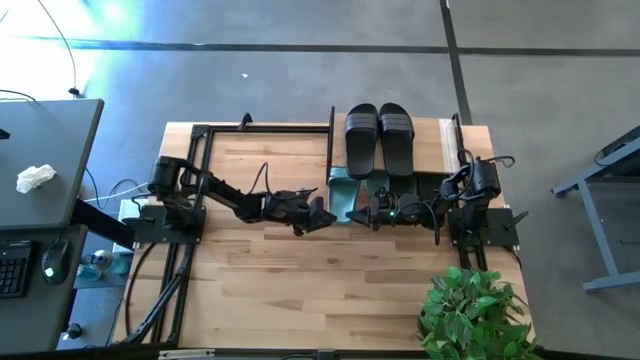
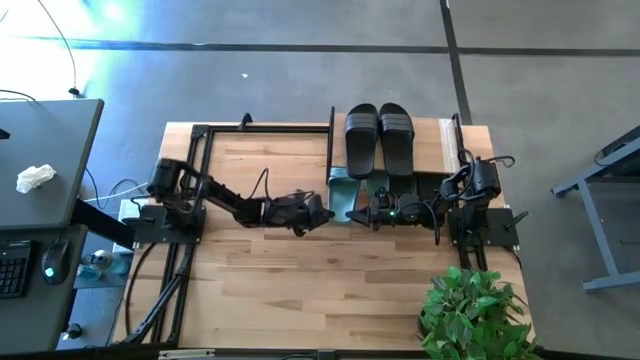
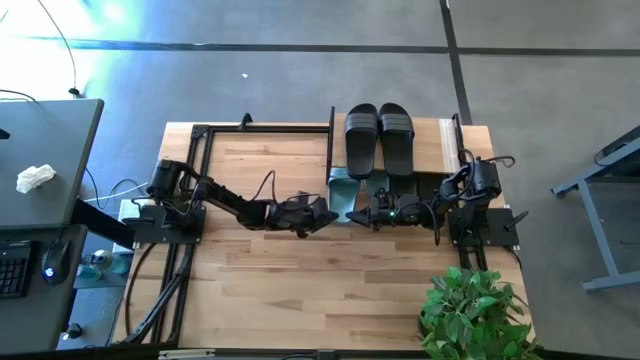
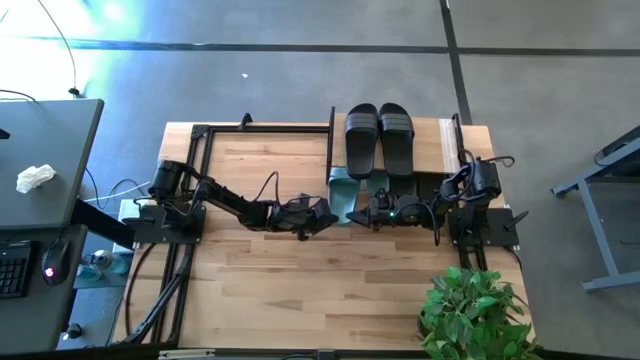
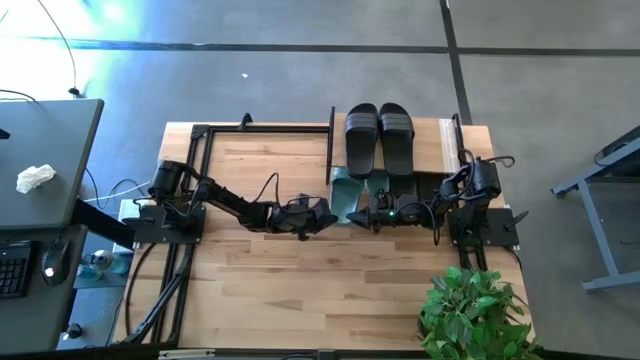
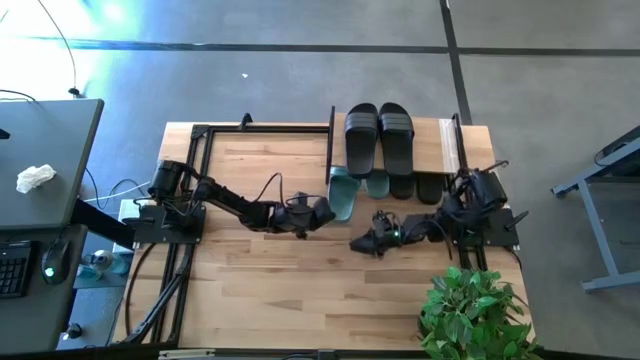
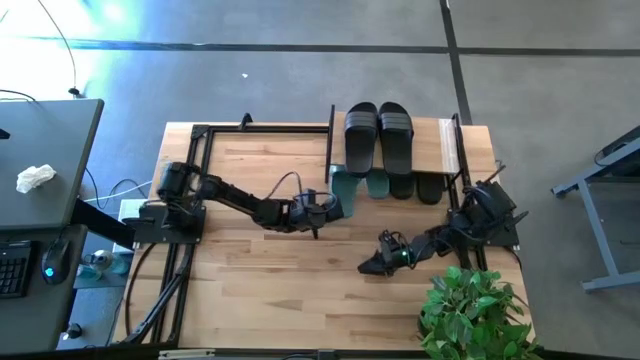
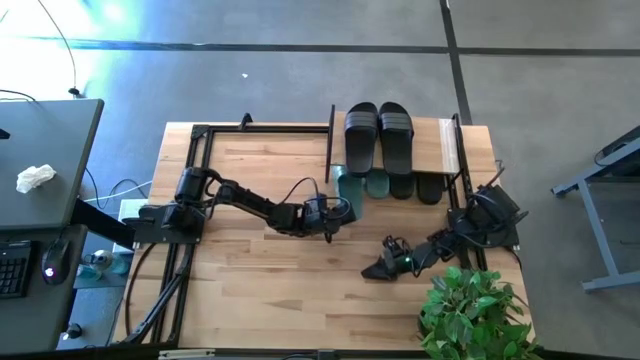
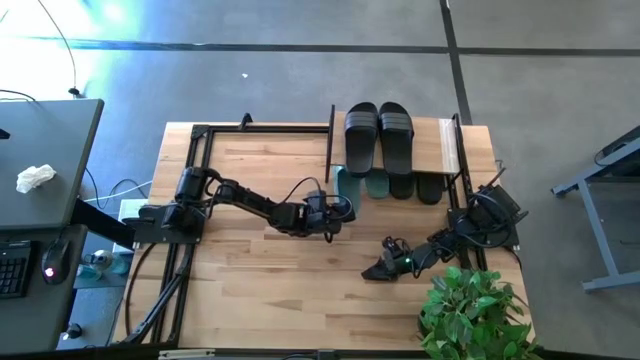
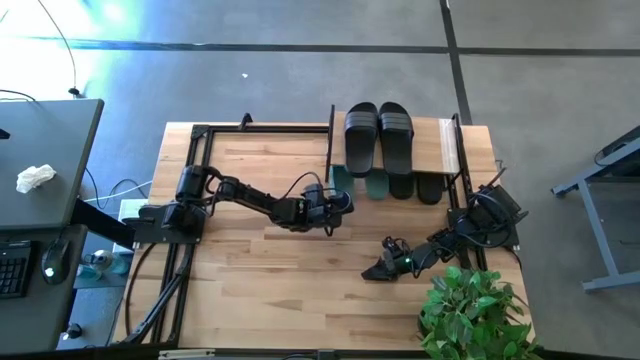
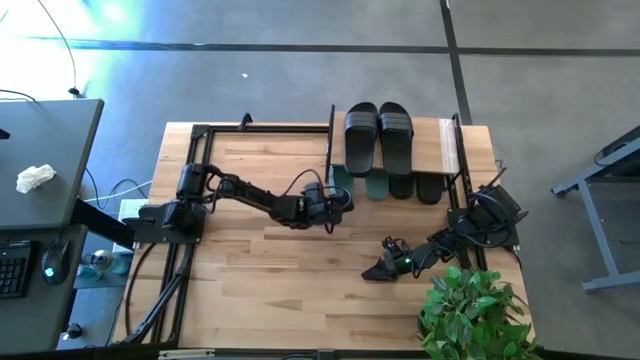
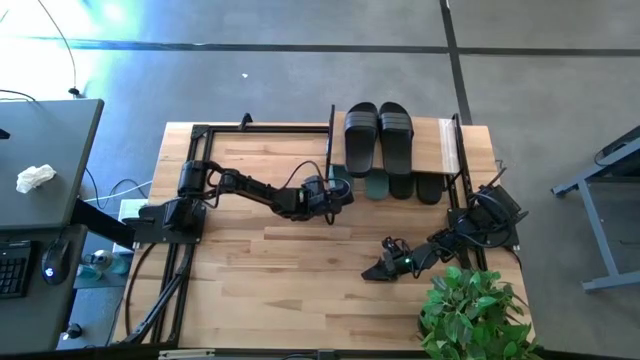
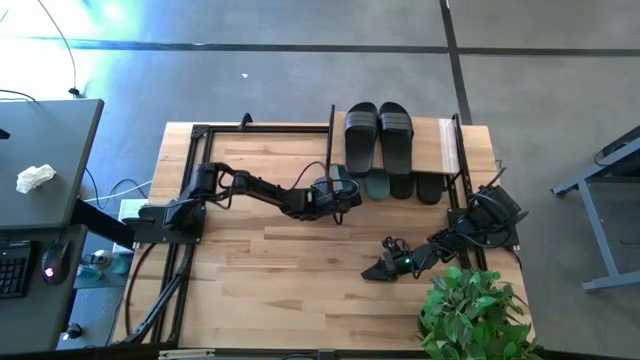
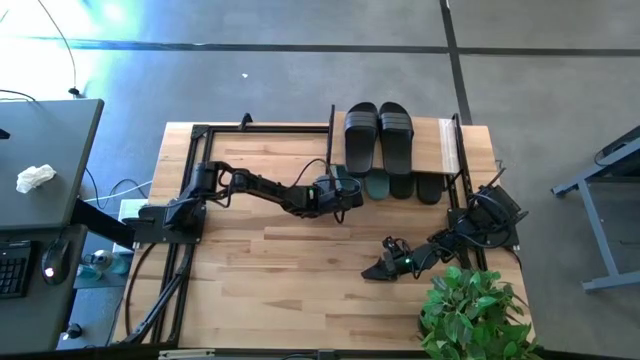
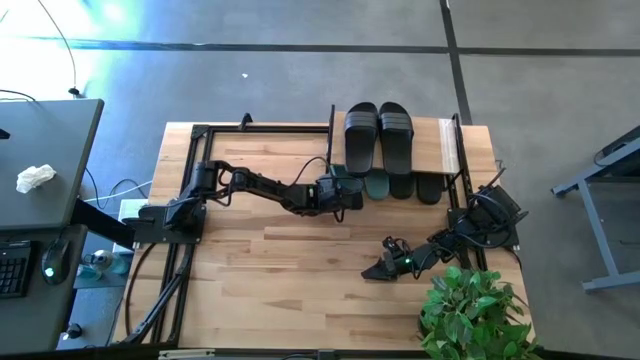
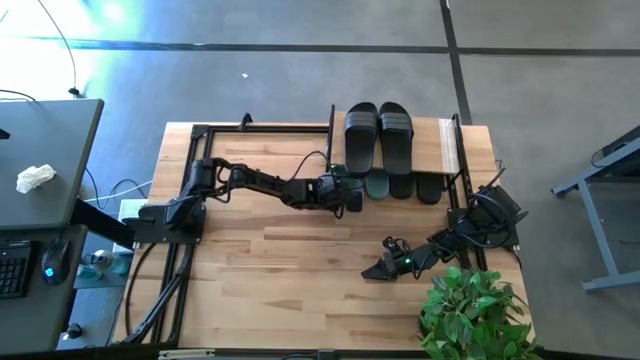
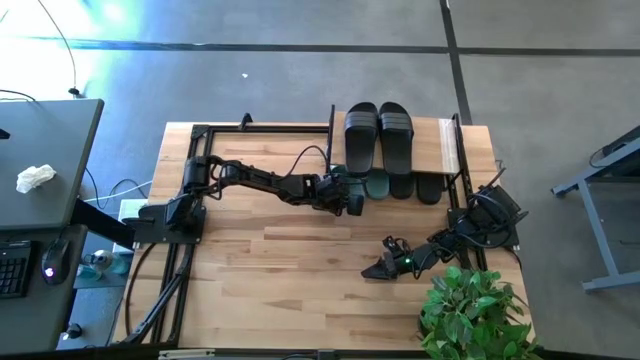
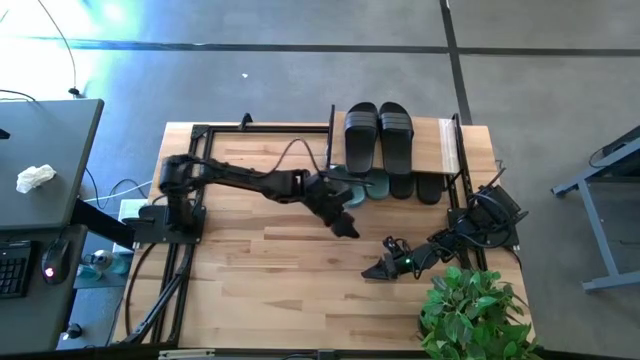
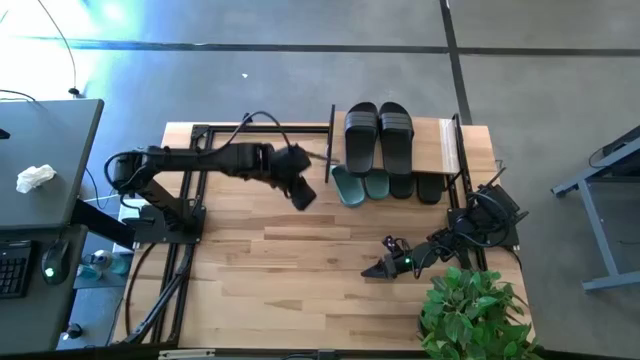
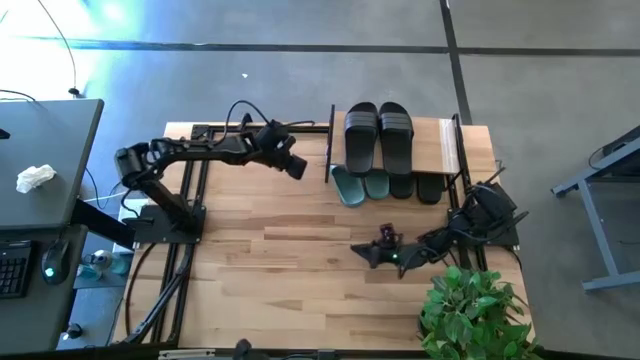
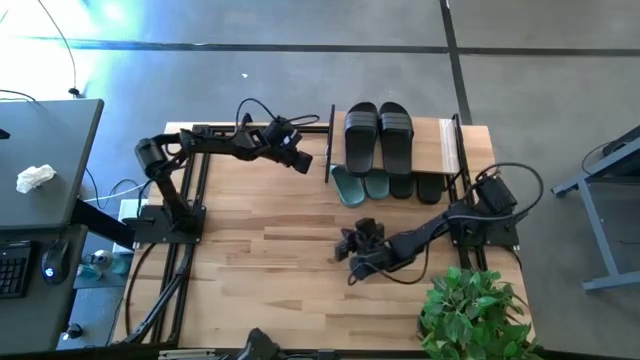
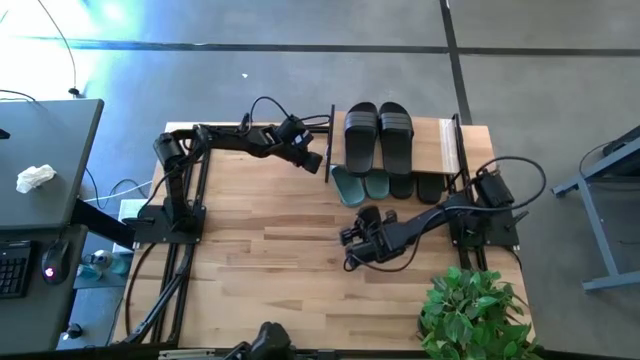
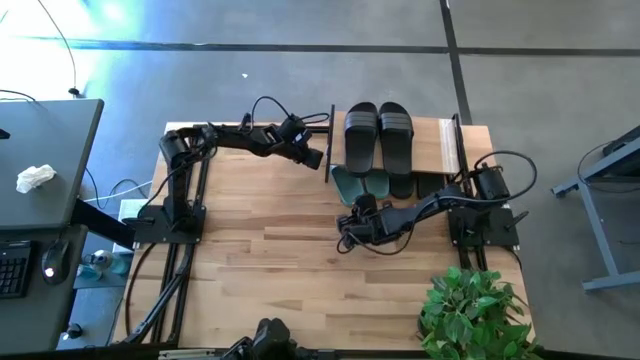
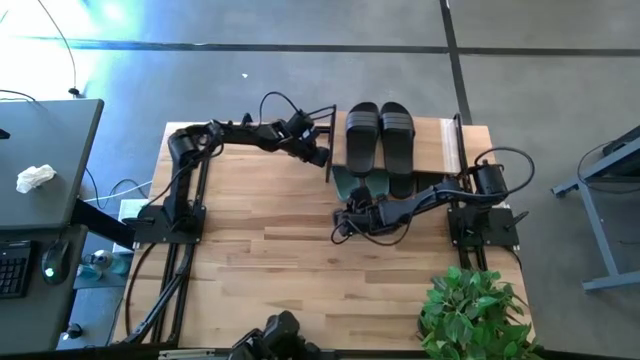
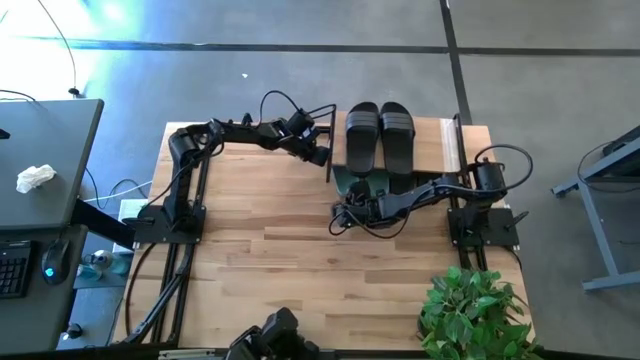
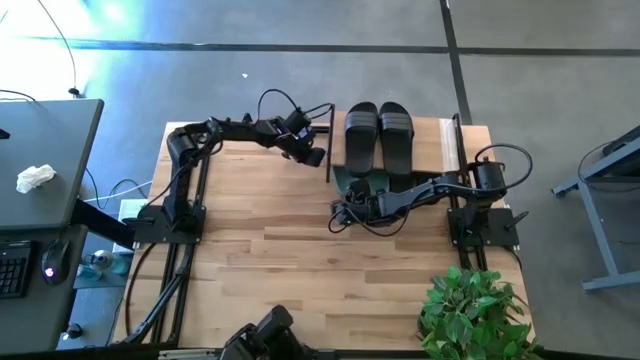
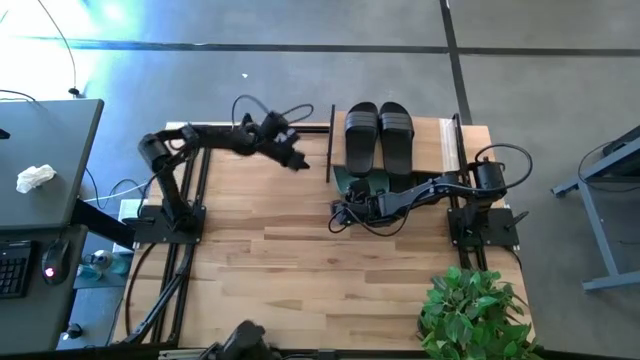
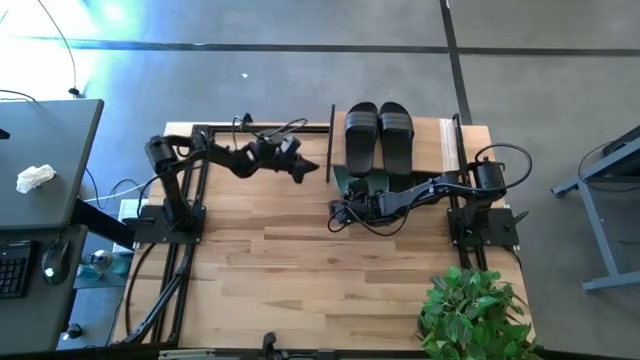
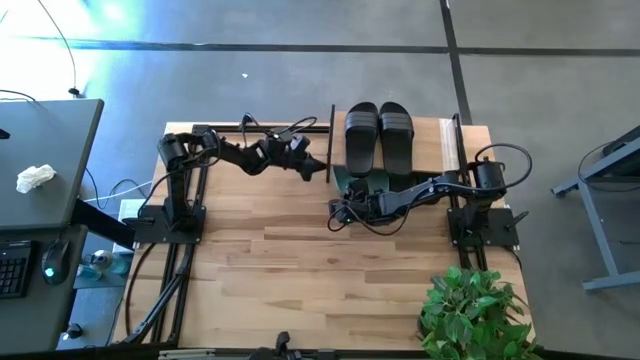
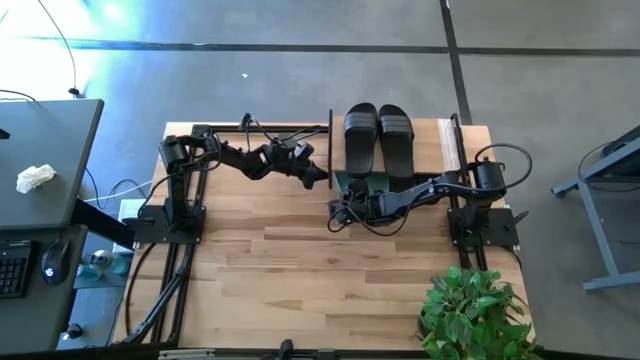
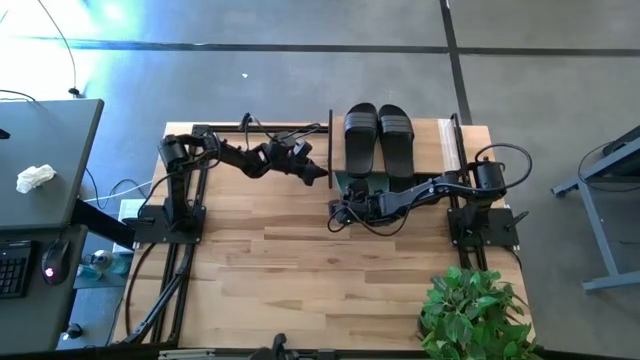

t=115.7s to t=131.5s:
Task: Pick and place slides into the shelf
Put the green slipper under the shelf

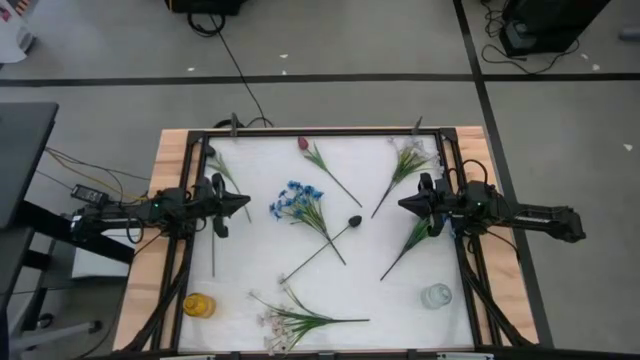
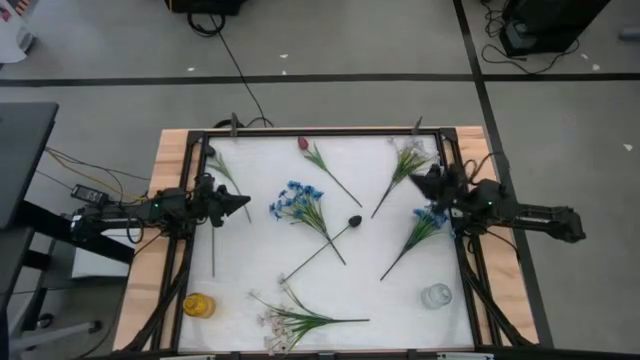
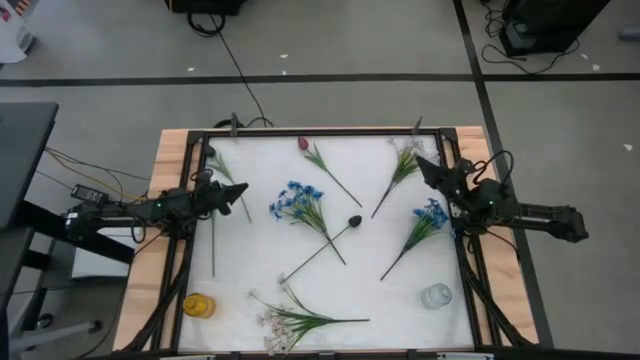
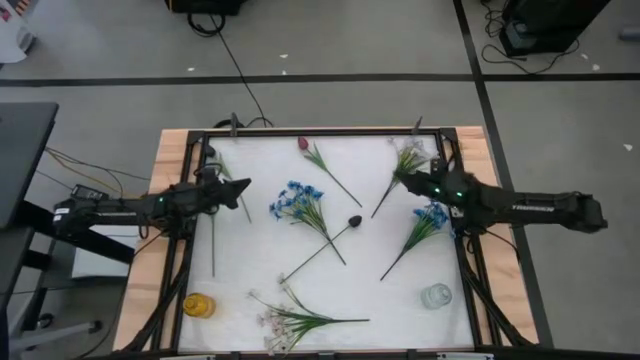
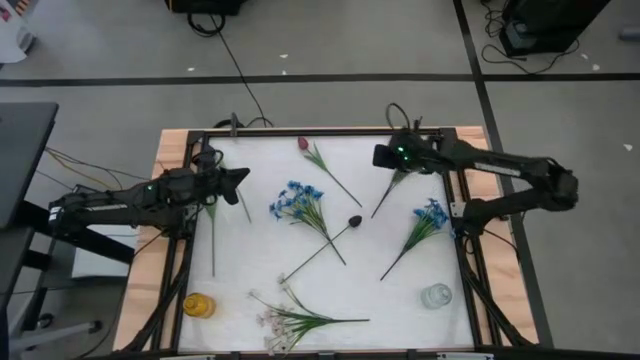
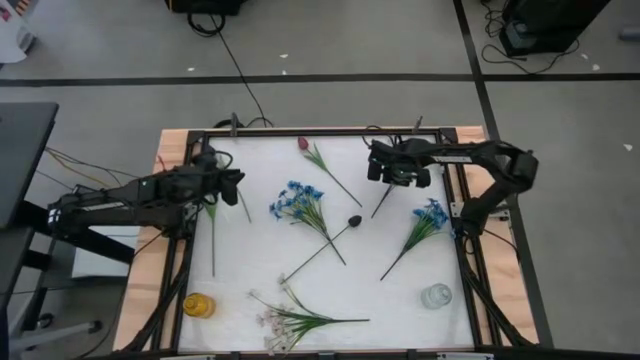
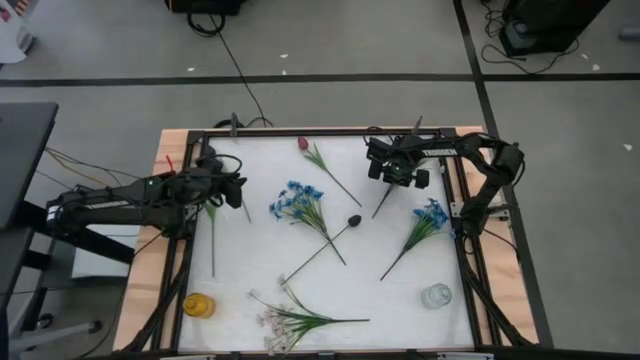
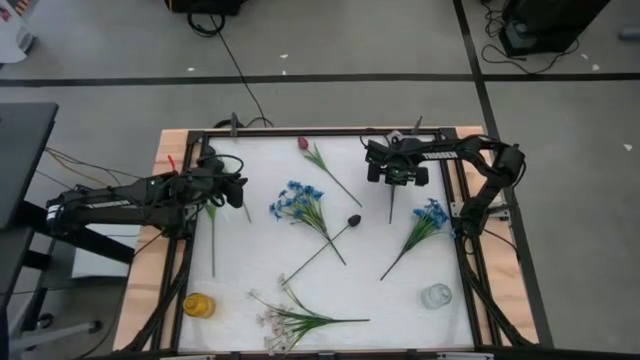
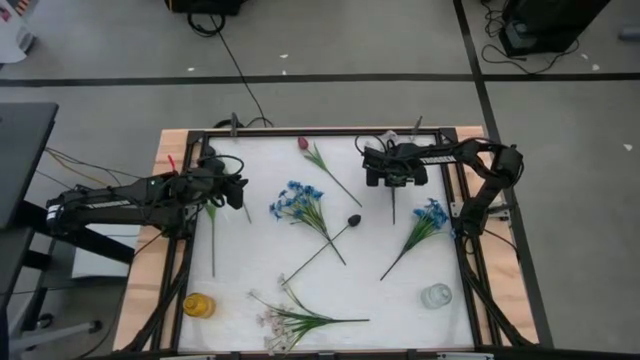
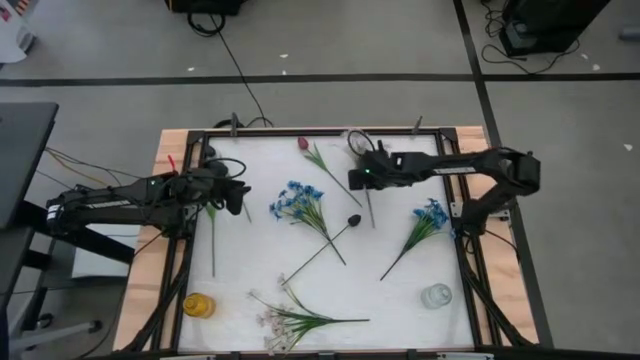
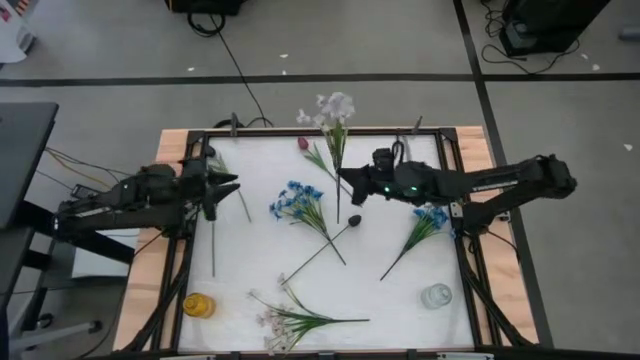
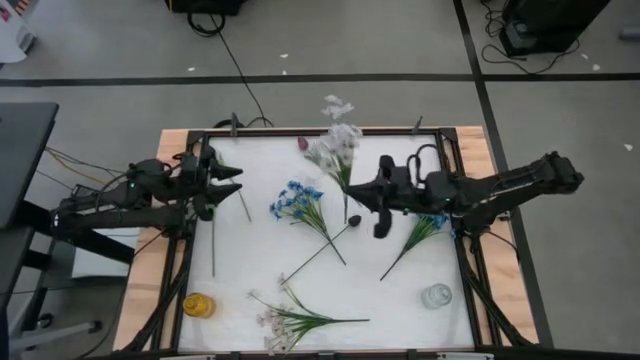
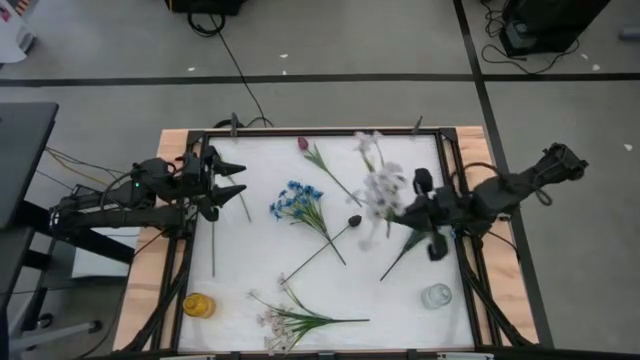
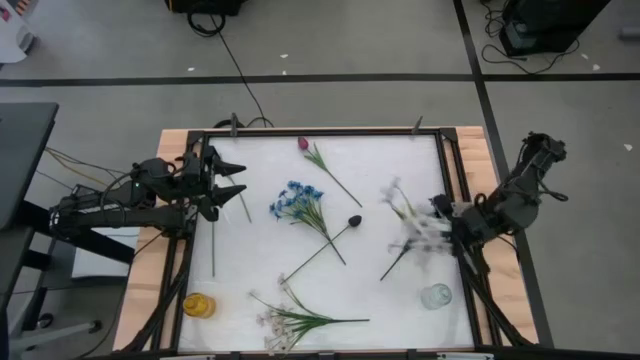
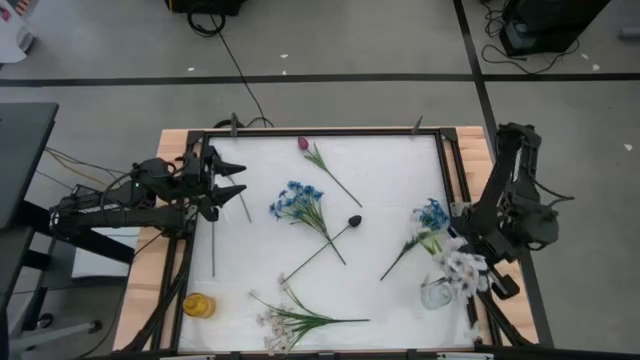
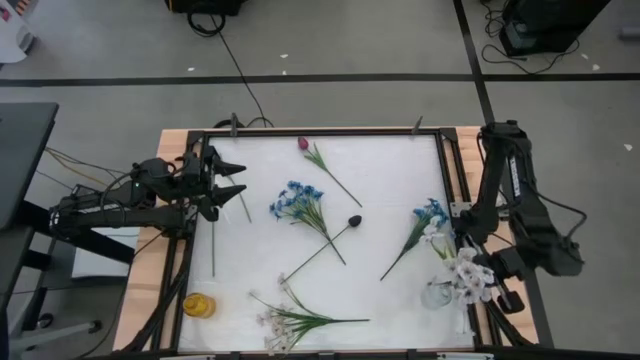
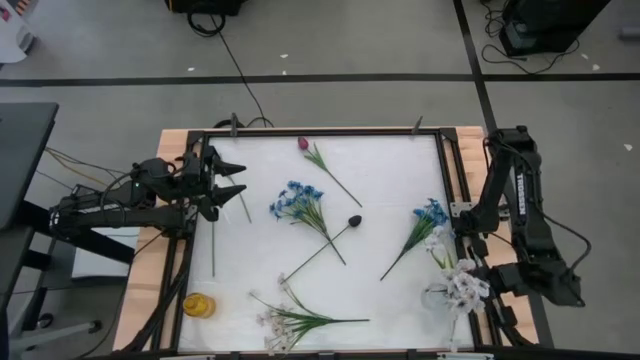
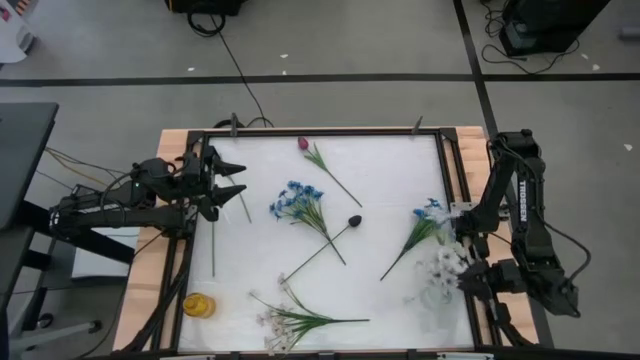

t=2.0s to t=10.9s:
Task: Sort flowers into vase by color
Put the top white flowers into the transparent vase
